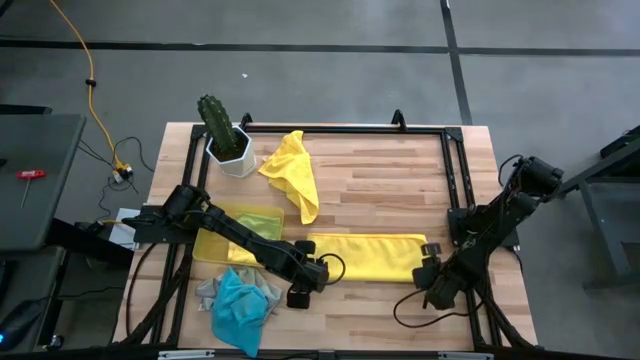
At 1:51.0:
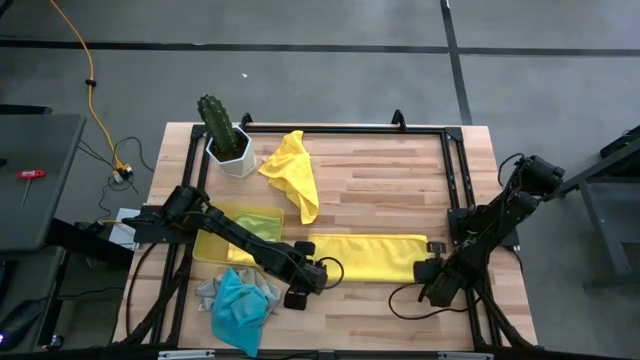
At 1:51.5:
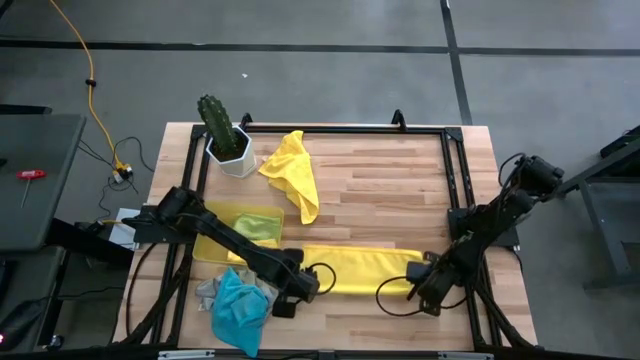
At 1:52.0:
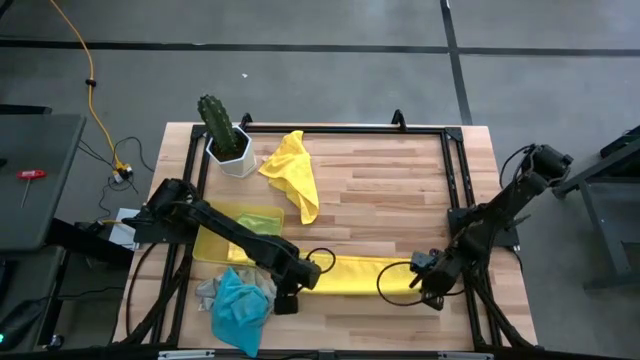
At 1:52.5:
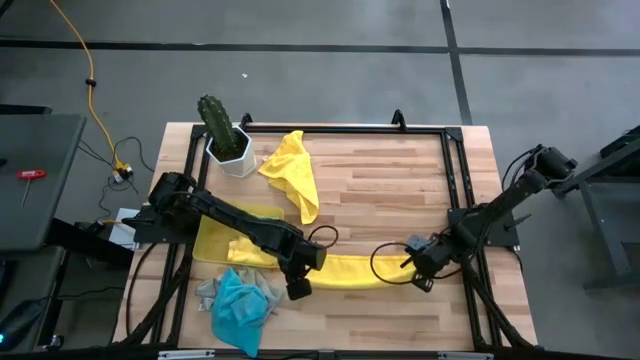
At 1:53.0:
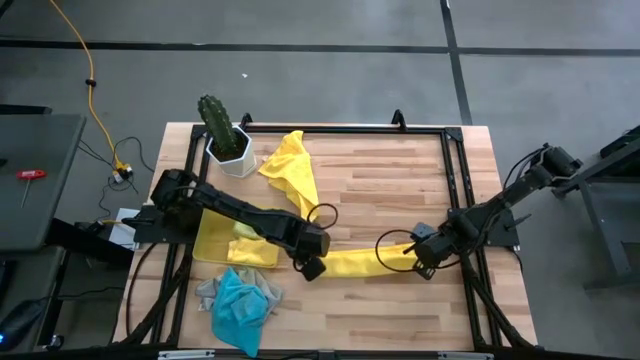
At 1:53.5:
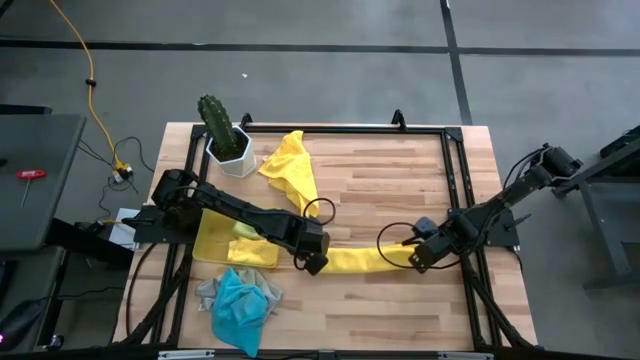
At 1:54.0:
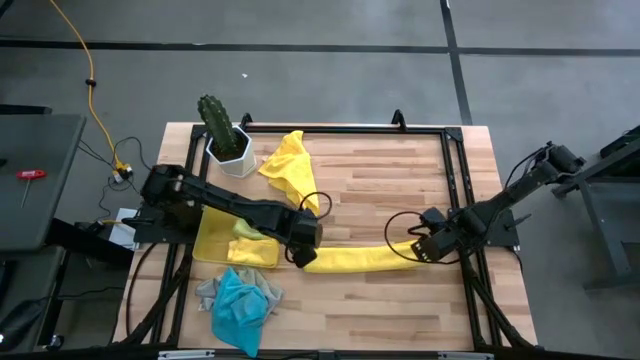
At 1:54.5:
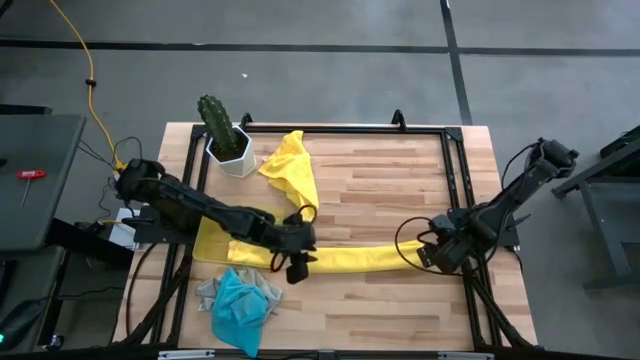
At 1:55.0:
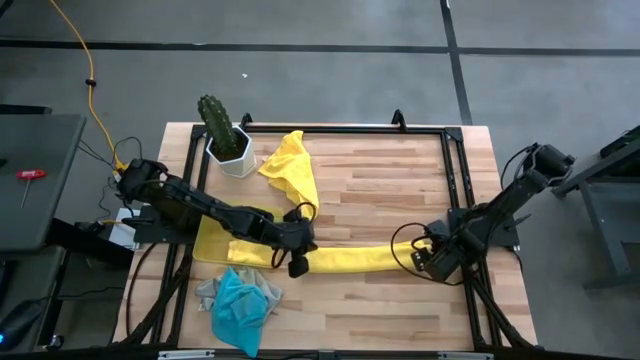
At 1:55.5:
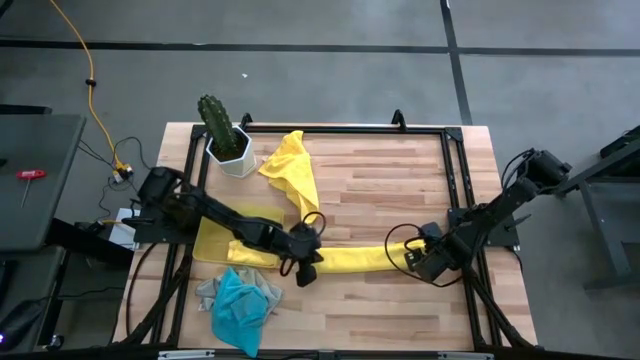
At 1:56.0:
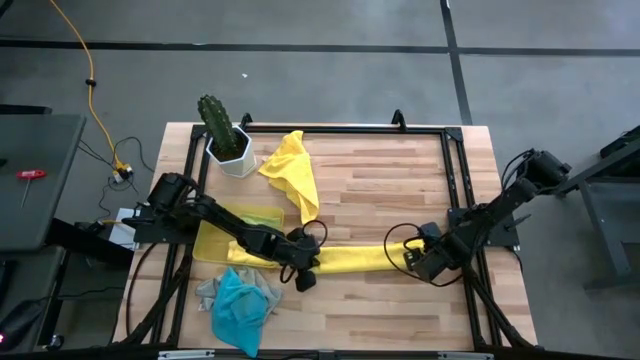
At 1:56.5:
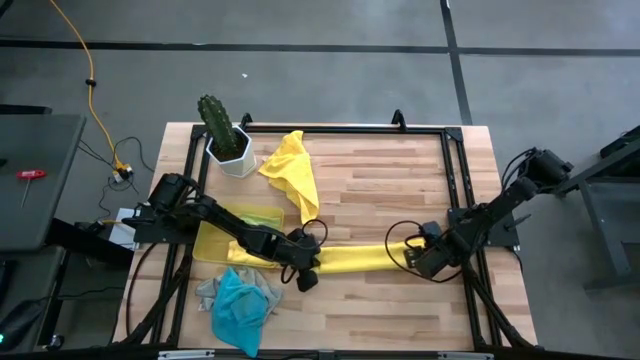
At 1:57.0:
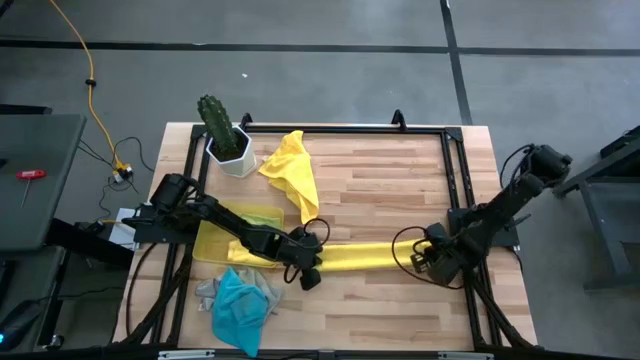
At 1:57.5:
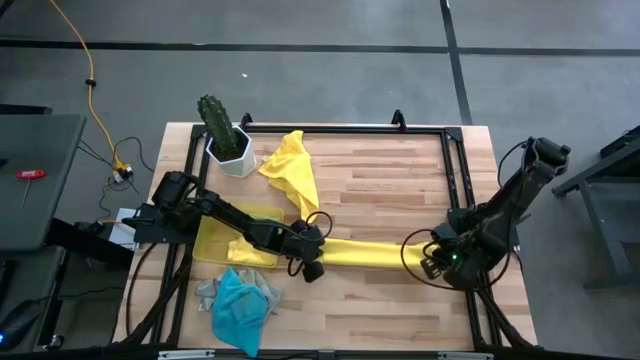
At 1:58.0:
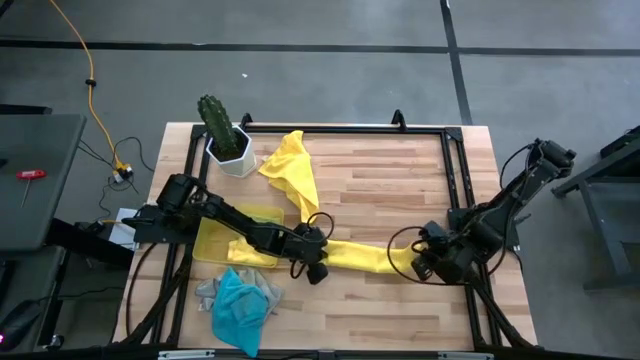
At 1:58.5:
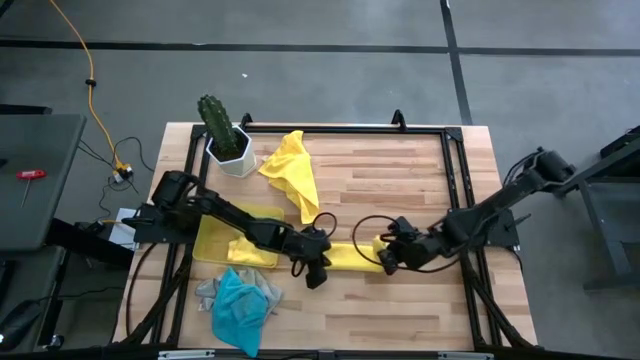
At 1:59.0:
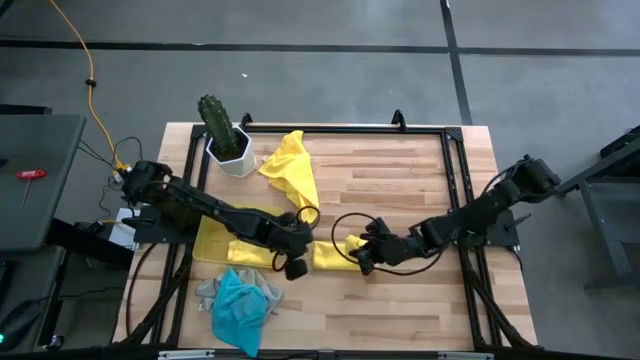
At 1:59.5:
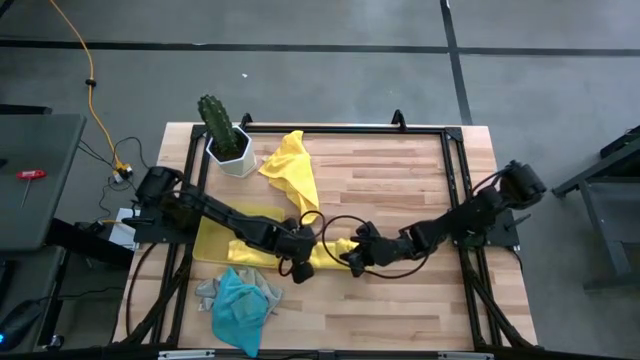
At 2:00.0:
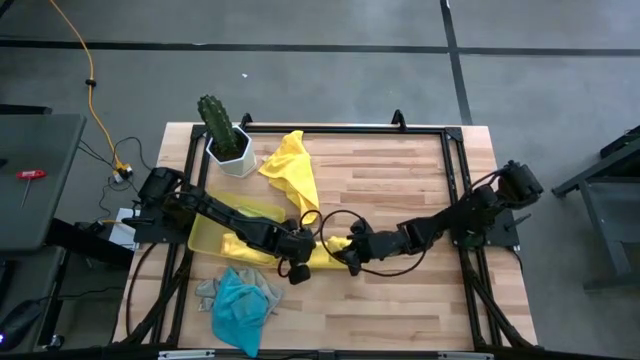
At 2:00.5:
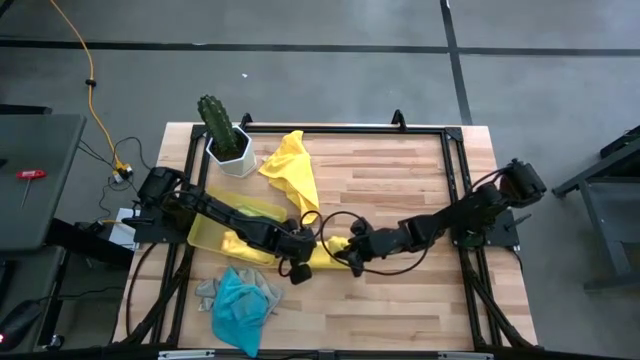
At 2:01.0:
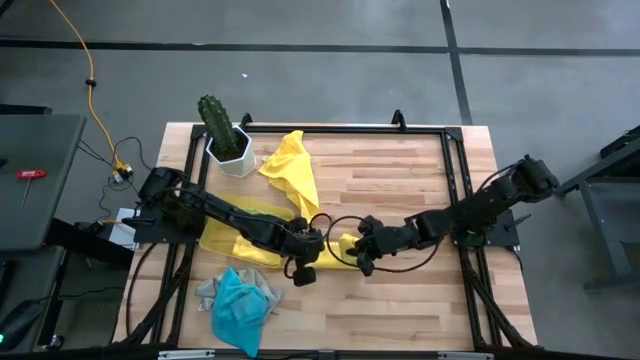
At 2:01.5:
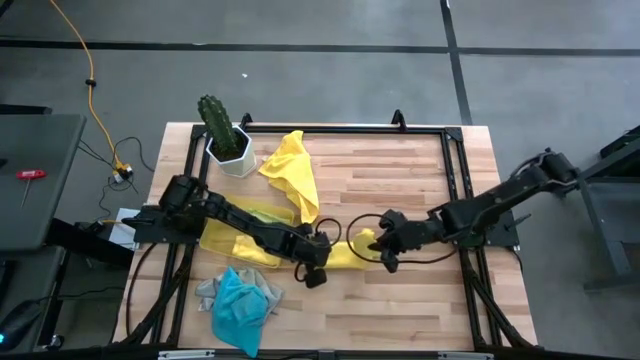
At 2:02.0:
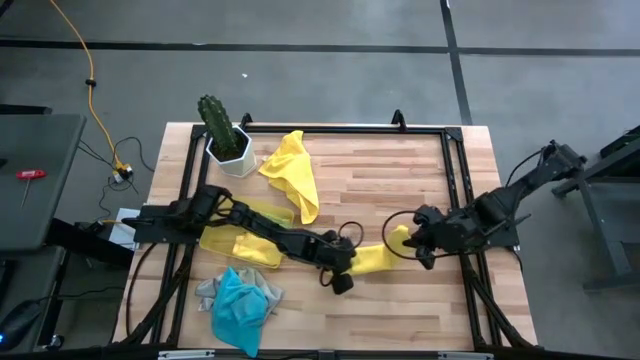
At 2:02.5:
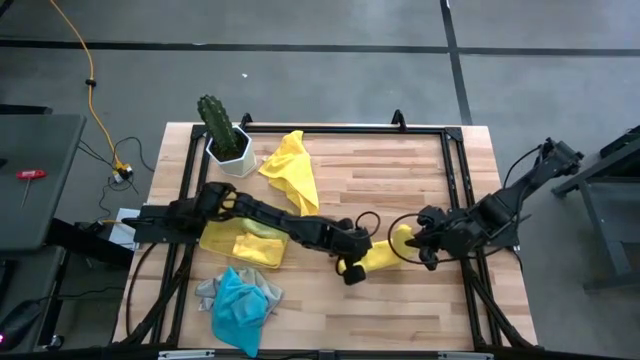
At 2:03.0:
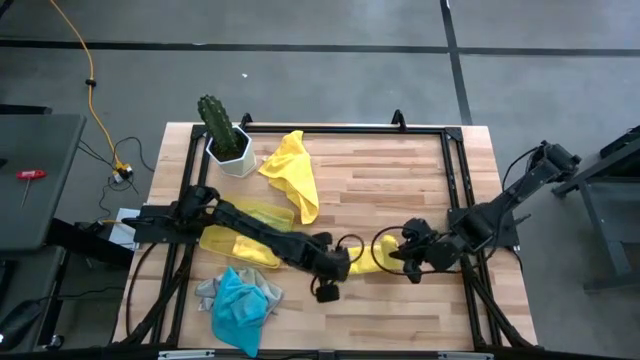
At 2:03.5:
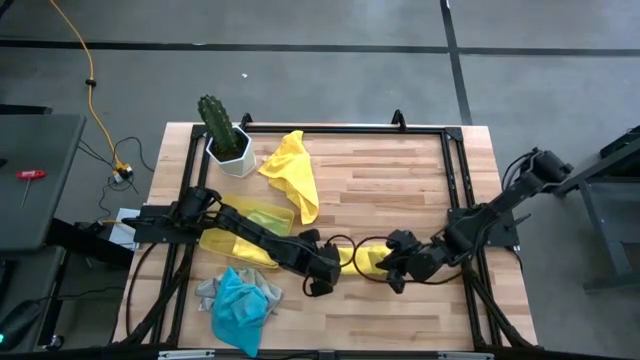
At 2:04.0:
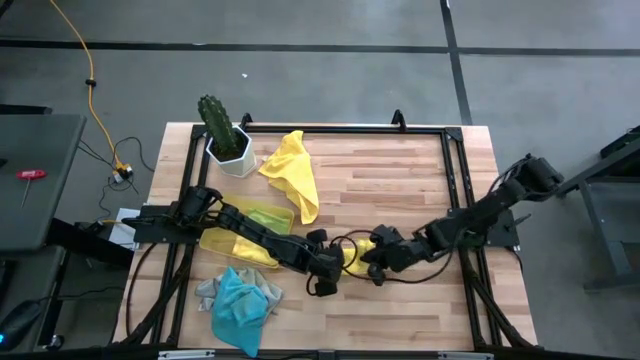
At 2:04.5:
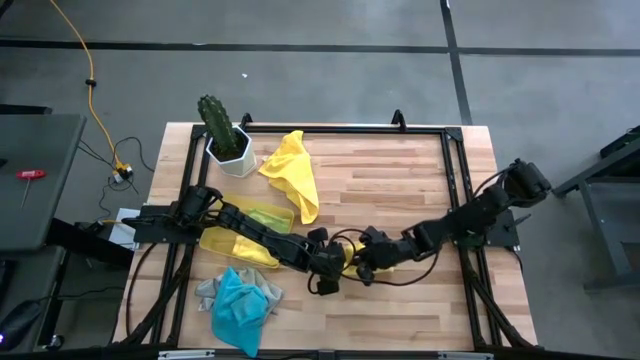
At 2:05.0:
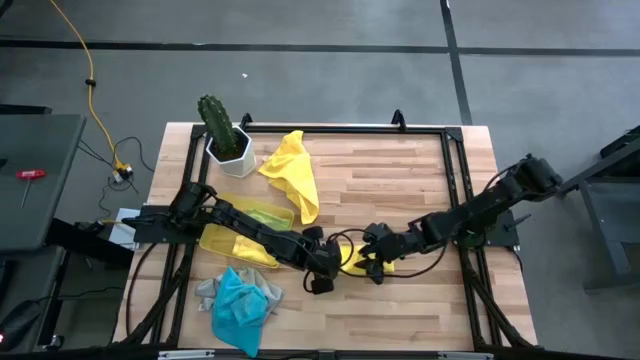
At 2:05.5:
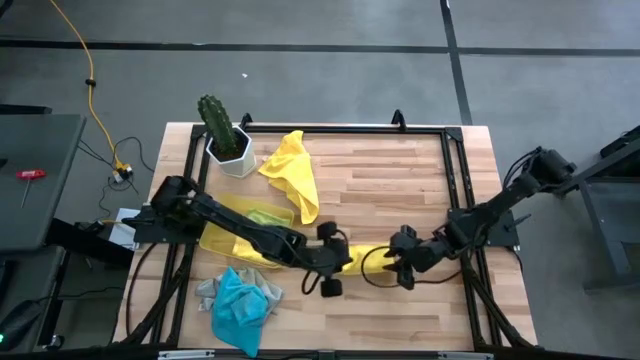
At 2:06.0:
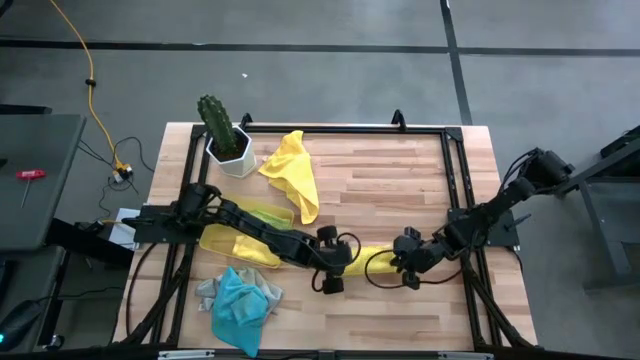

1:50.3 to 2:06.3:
Task: Fold microfiber towels
Fold the right yellow microfiber towel

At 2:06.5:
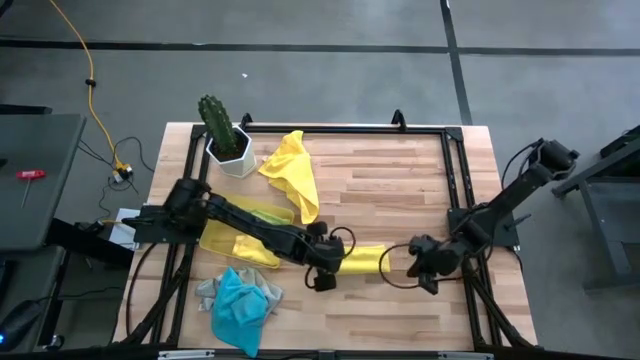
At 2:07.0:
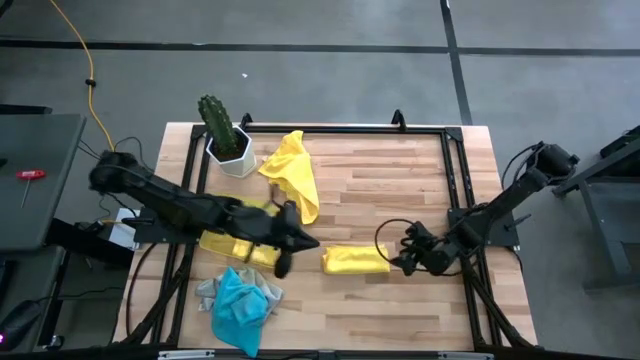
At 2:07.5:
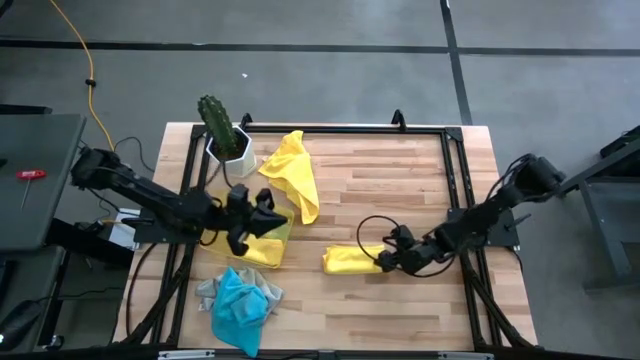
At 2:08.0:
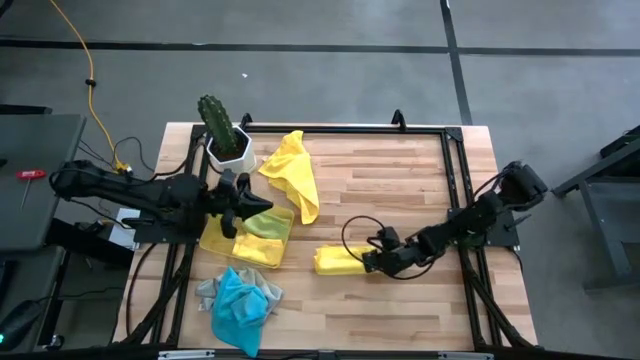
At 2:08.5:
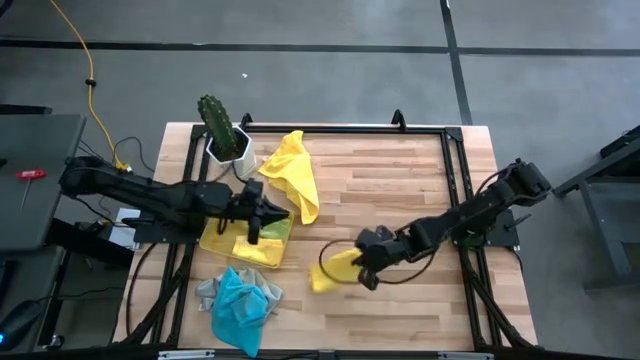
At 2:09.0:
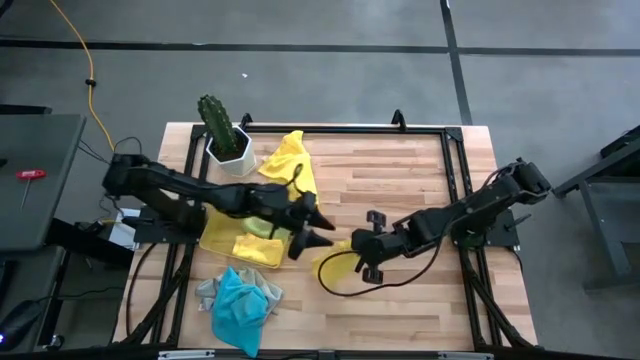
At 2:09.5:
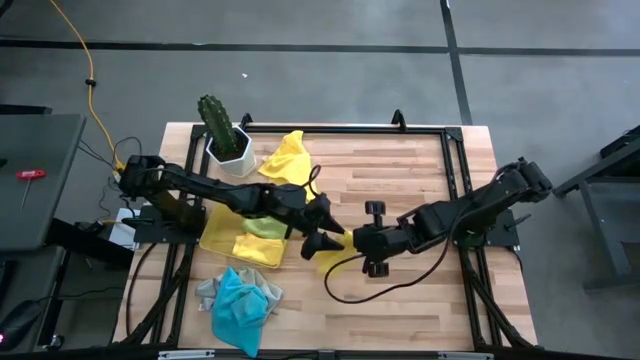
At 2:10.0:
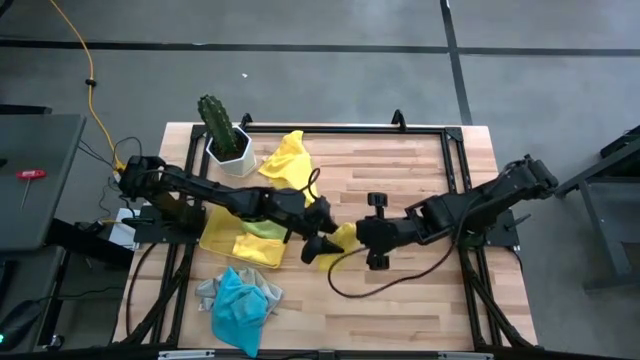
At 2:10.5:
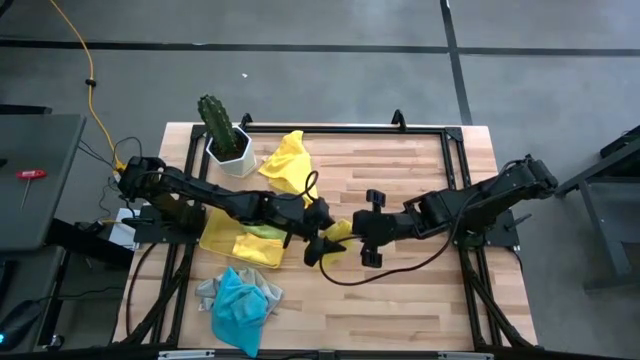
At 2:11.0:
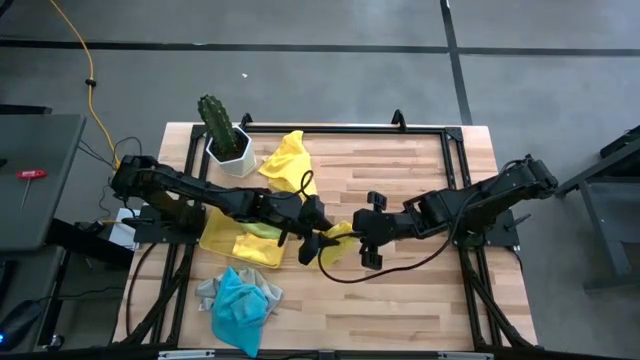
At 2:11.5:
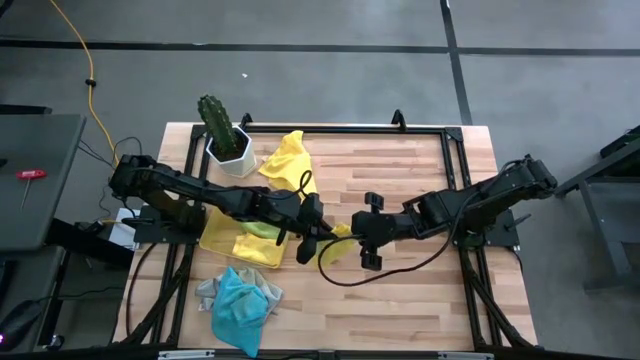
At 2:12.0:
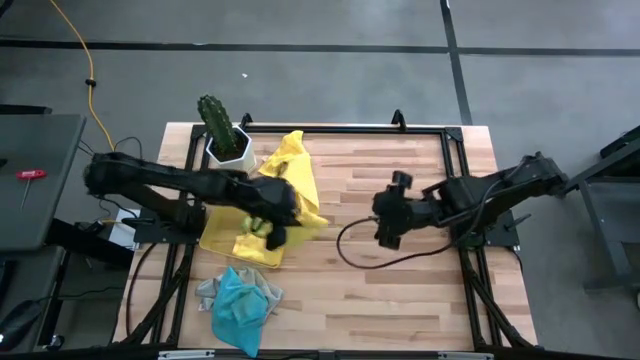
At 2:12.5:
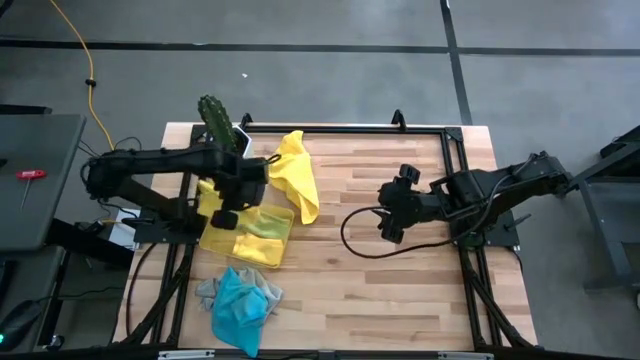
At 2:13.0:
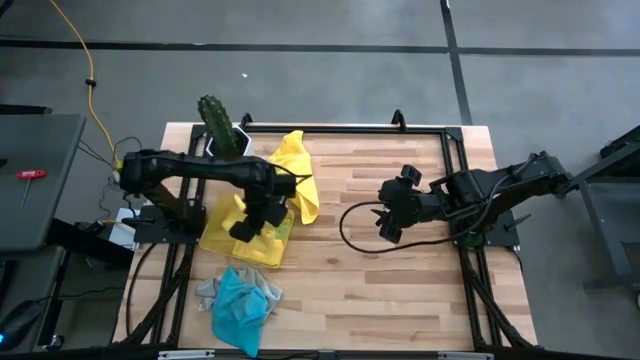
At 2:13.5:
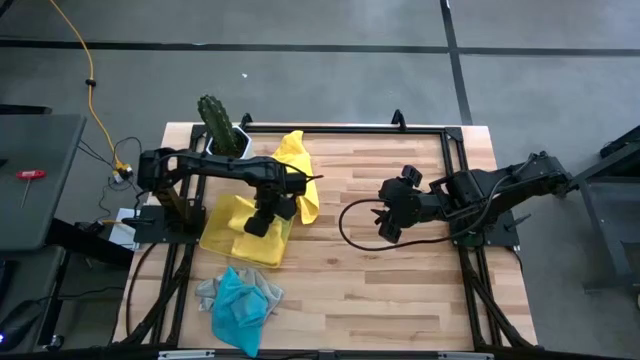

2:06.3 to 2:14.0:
Put the right yellow microfiber towel into the yellow bin
